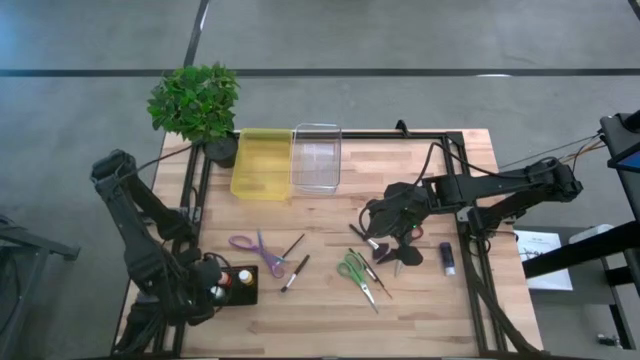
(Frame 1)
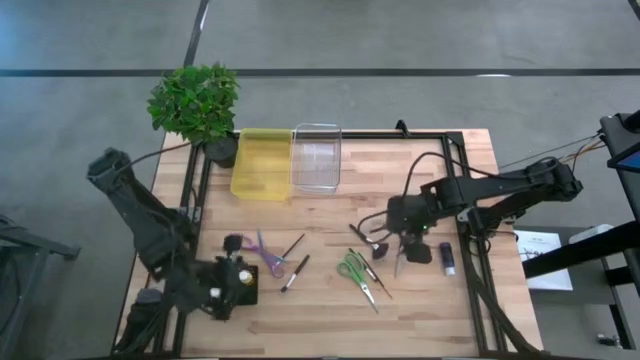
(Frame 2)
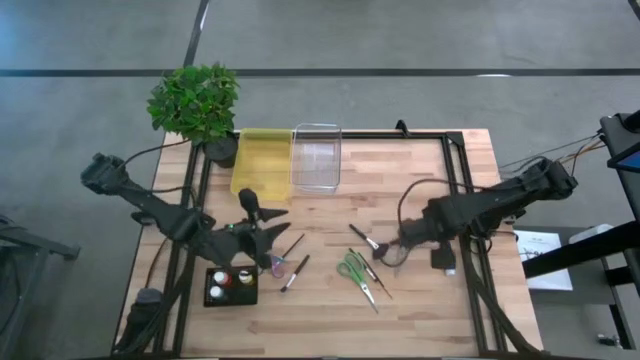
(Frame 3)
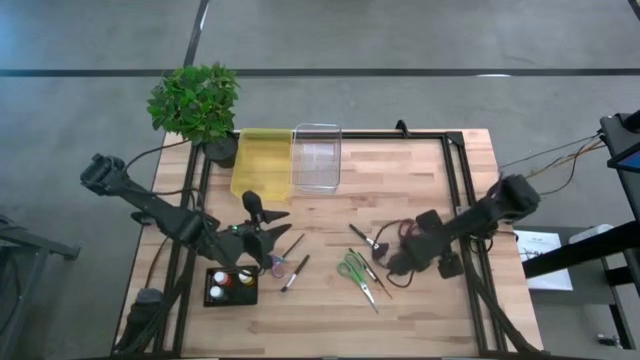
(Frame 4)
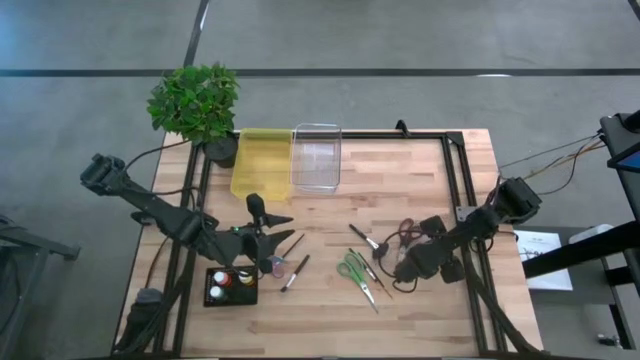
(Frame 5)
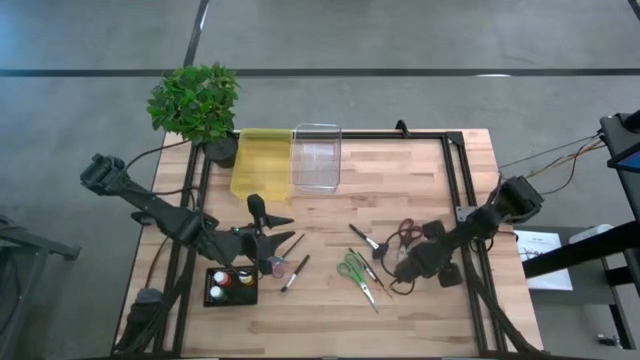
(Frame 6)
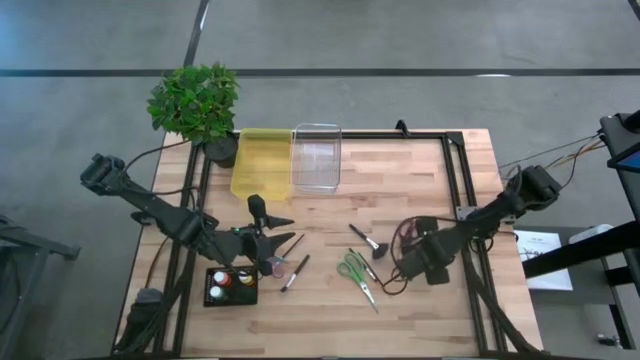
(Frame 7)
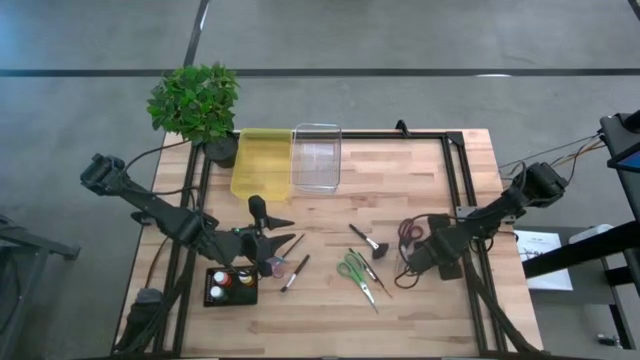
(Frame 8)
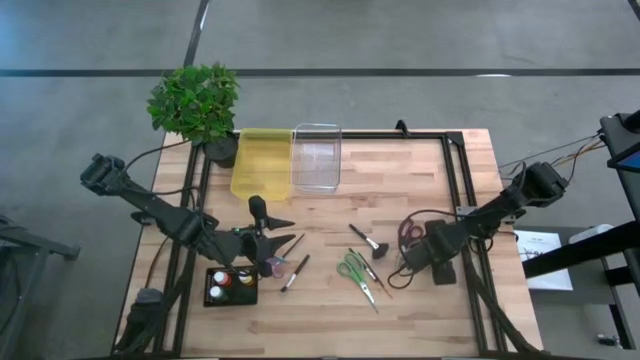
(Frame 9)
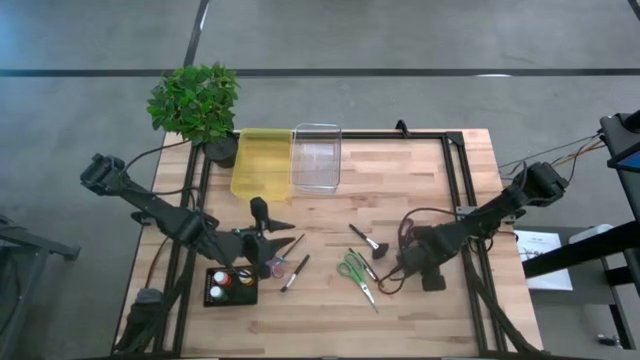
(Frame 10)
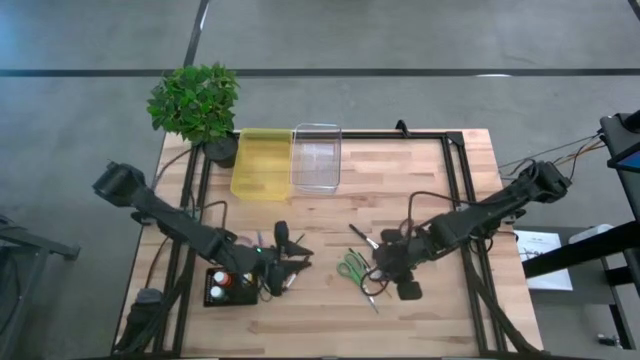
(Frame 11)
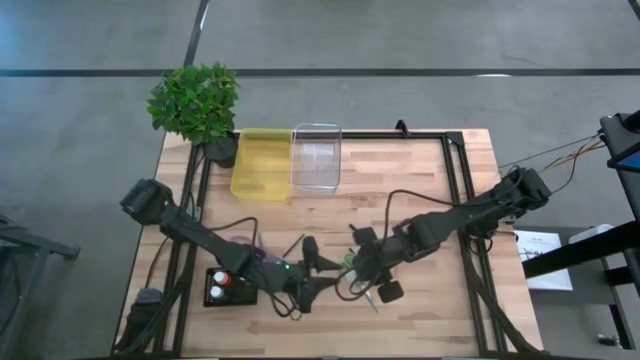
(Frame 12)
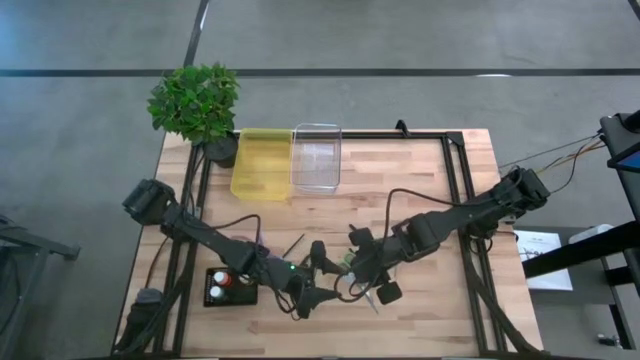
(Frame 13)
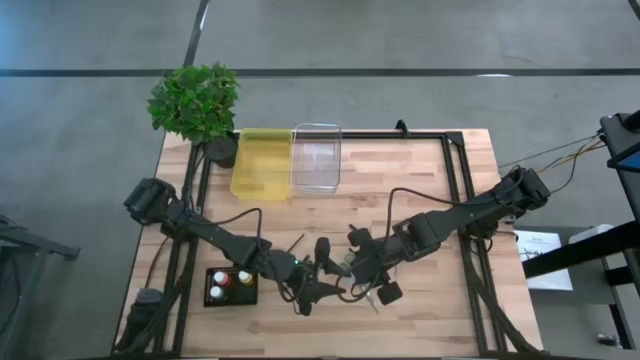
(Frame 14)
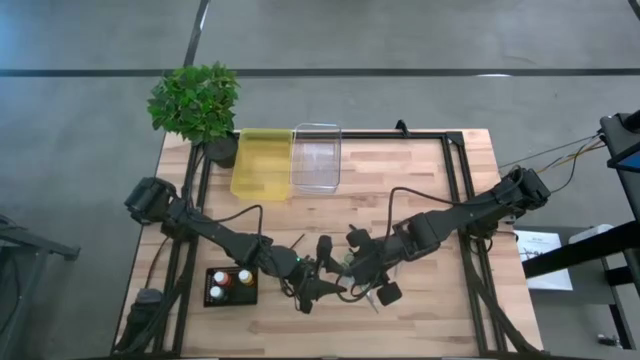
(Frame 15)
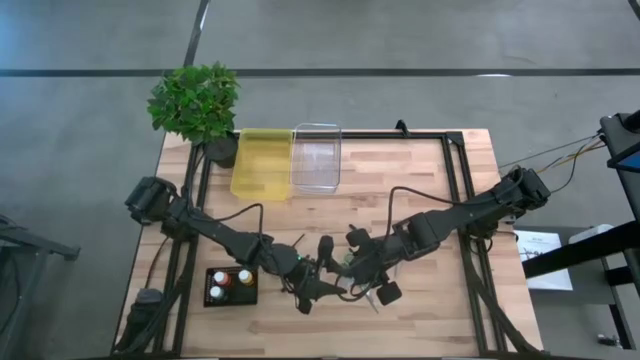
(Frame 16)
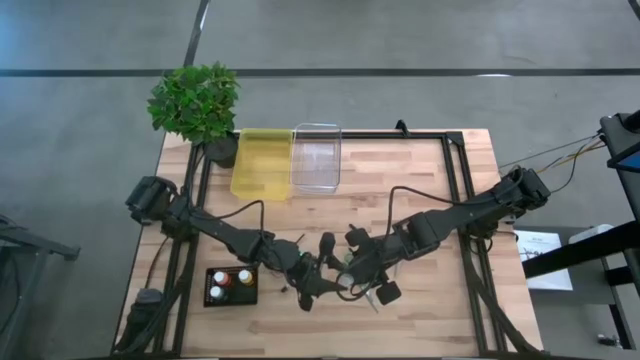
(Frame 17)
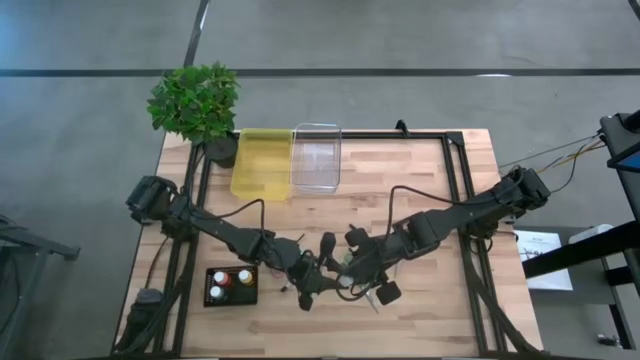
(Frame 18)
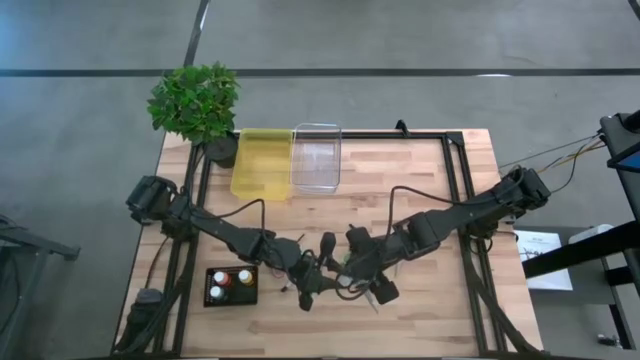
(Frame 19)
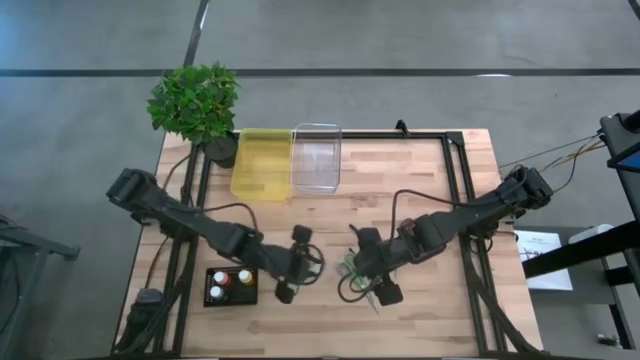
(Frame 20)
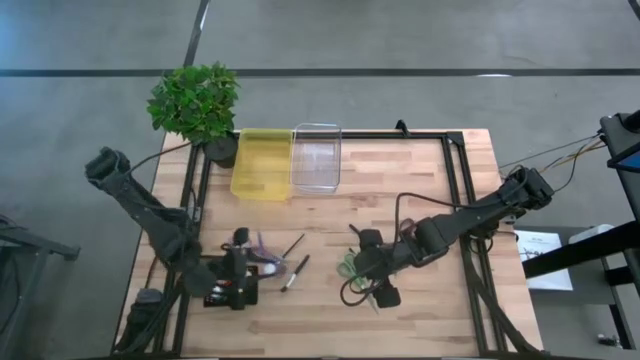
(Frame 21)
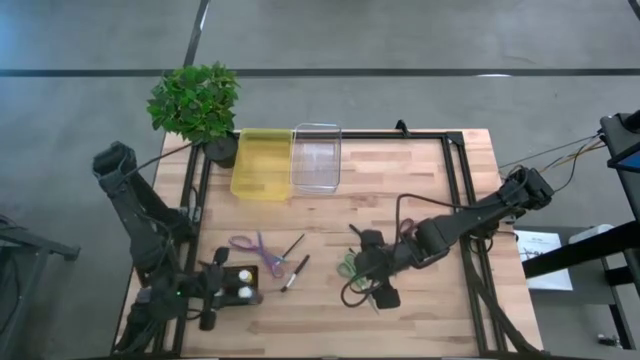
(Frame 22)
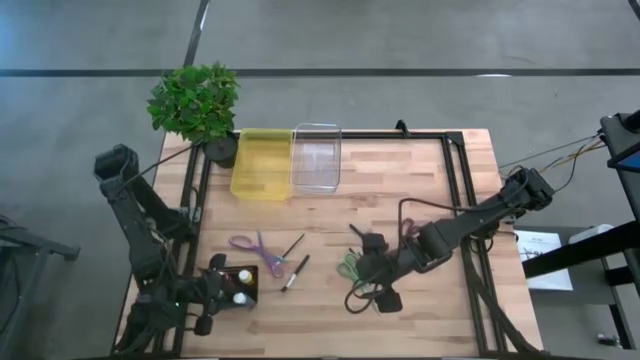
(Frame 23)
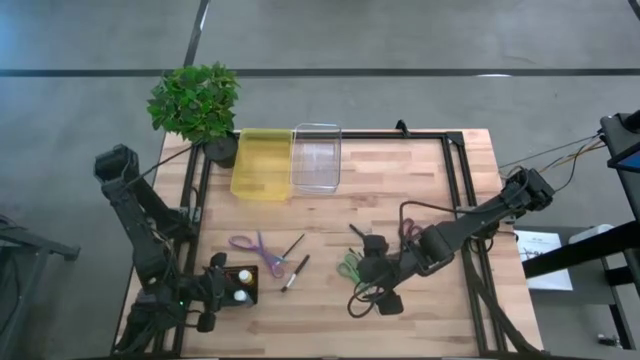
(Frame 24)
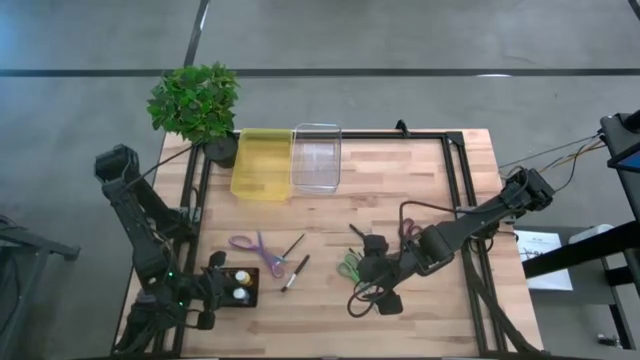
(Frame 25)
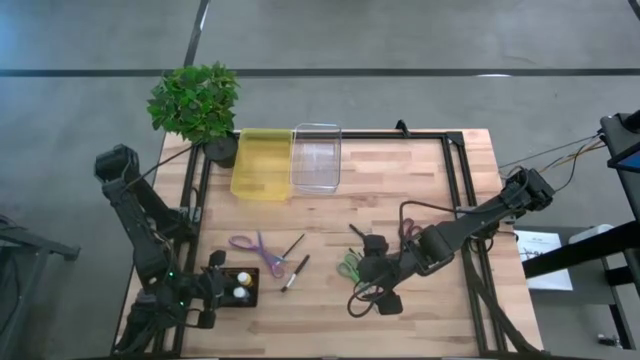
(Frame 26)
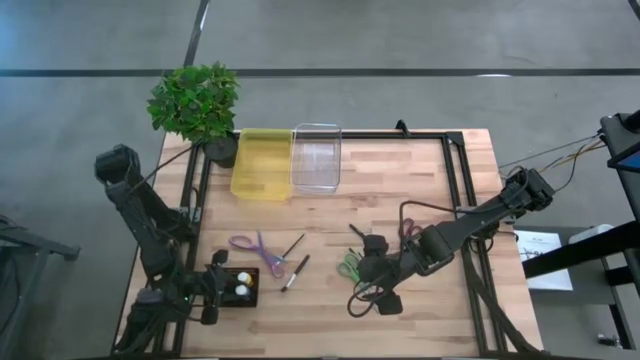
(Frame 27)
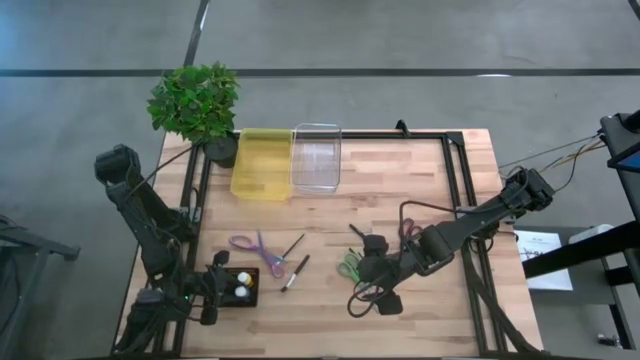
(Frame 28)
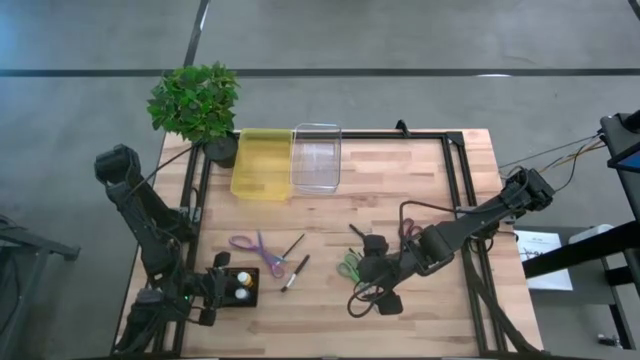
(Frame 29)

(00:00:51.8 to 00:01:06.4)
Task: Pick & Place Paint Supplies
Put the blue paint bottle into the black bin

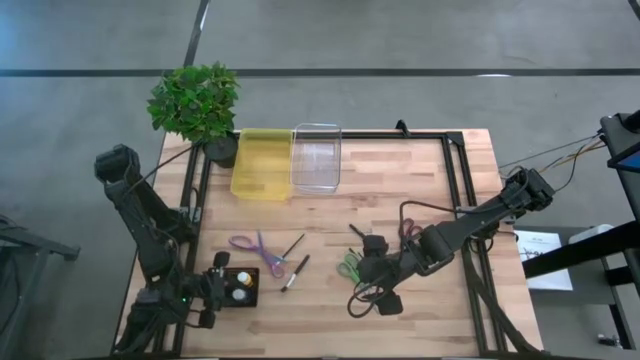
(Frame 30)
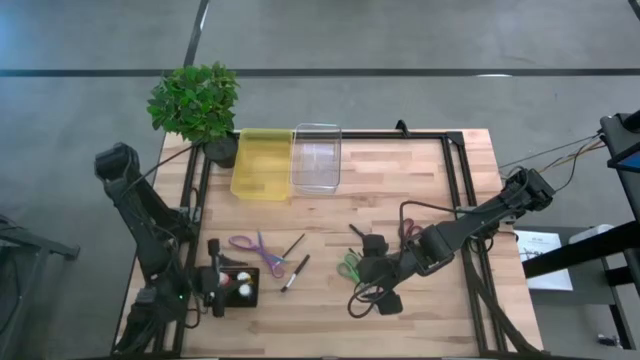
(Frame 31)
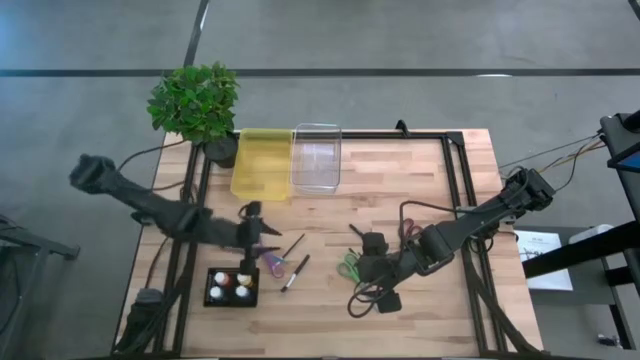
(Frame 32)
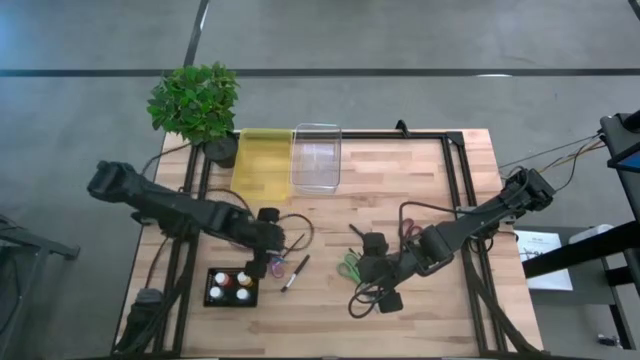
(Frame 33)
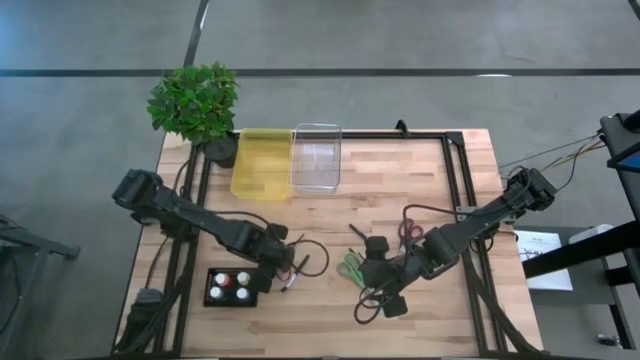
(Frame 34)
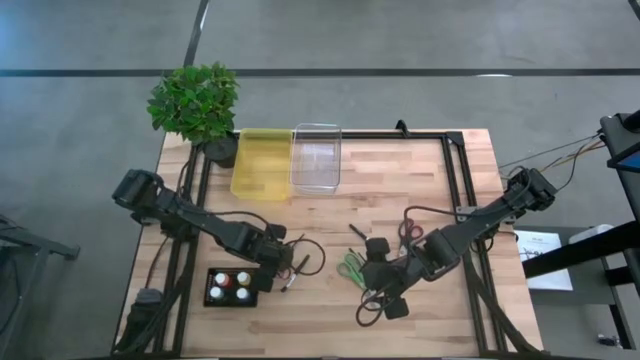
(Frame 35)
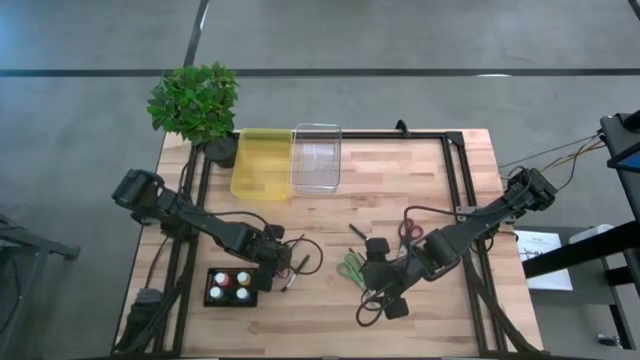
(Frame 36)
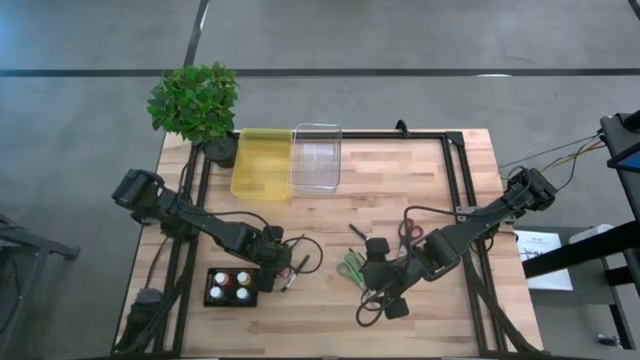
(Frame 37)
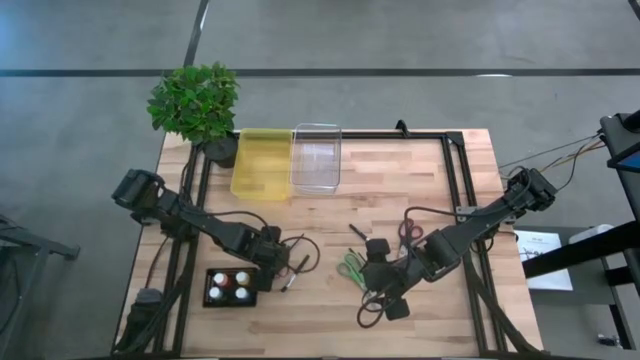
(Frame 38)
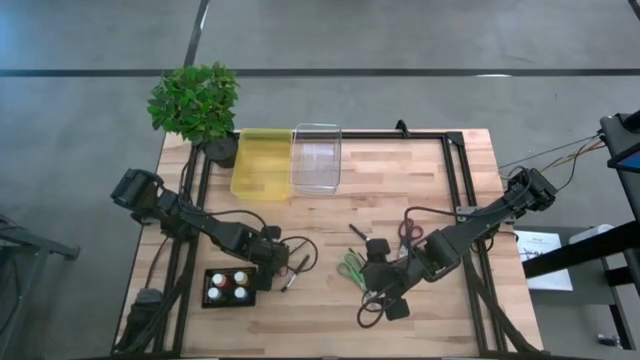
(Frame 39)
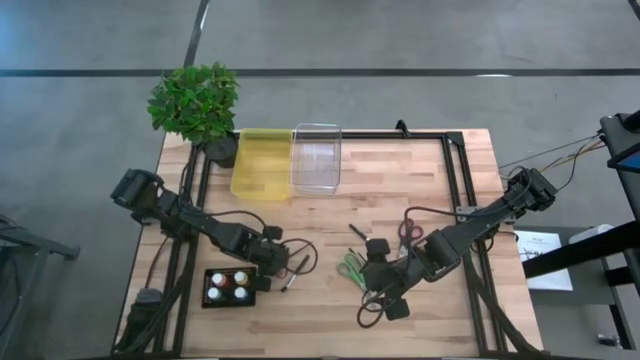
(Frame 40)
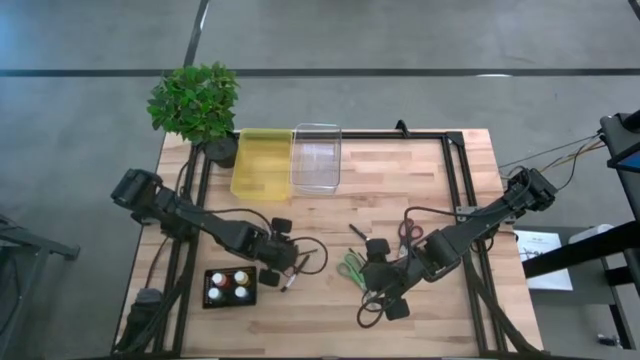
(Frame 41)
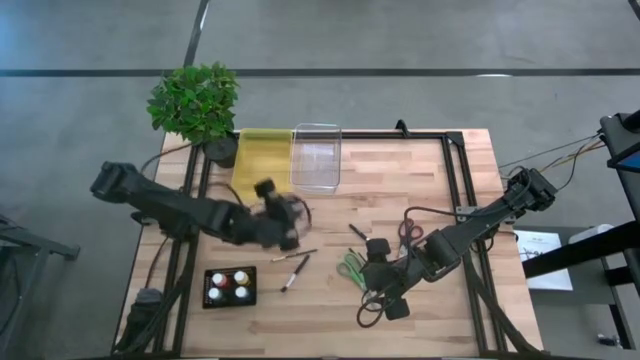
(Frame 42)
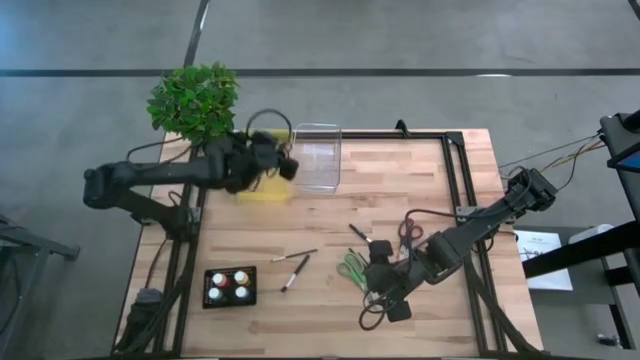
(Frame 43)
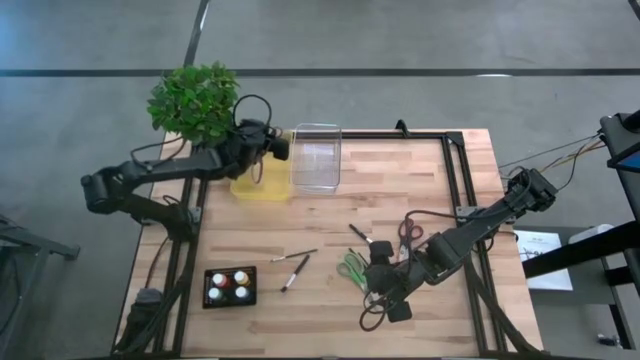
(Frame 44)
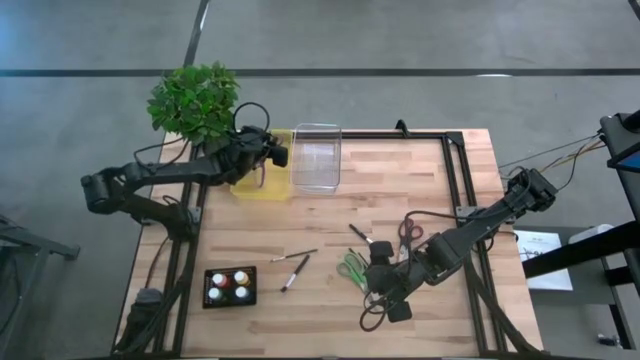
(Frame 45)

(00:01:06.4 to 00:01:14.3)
Put the violet scissors into the transparent yellow bin
